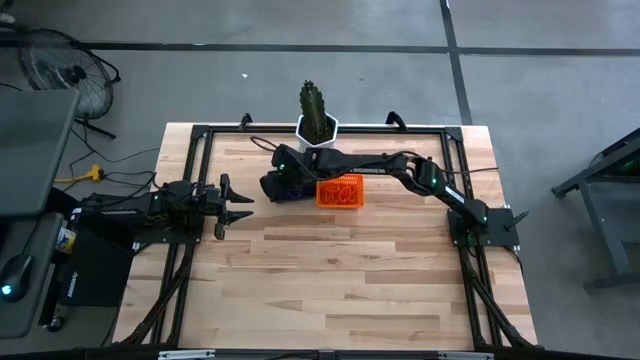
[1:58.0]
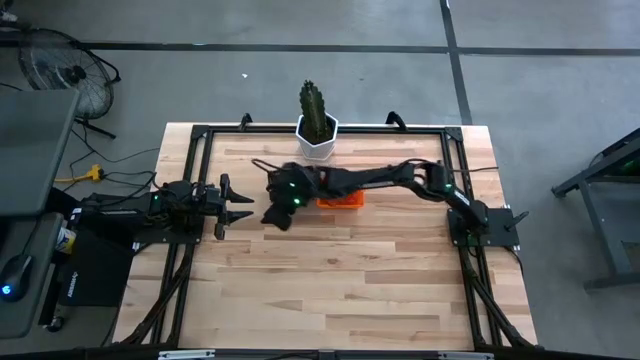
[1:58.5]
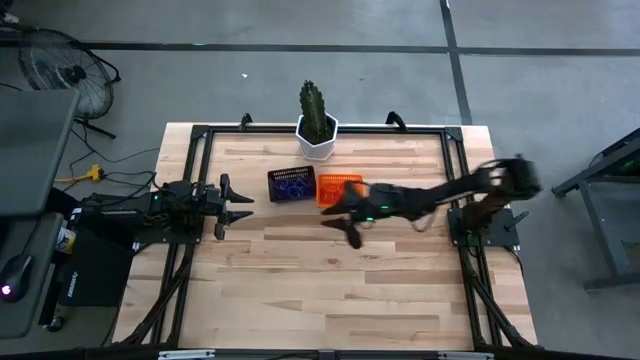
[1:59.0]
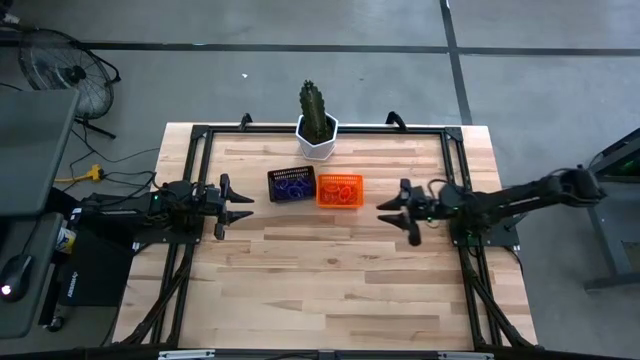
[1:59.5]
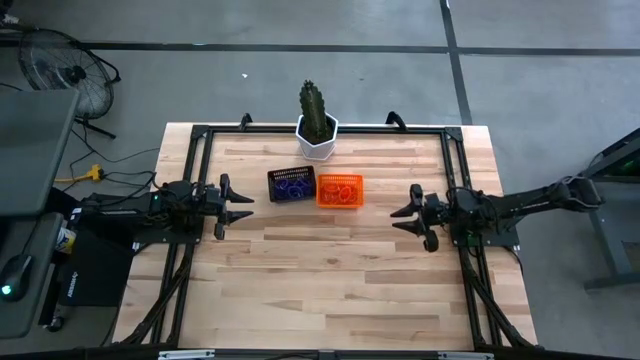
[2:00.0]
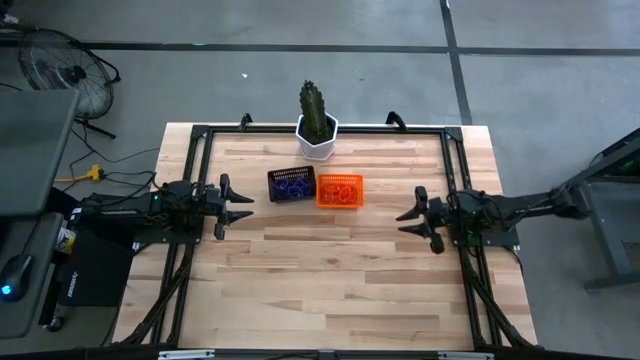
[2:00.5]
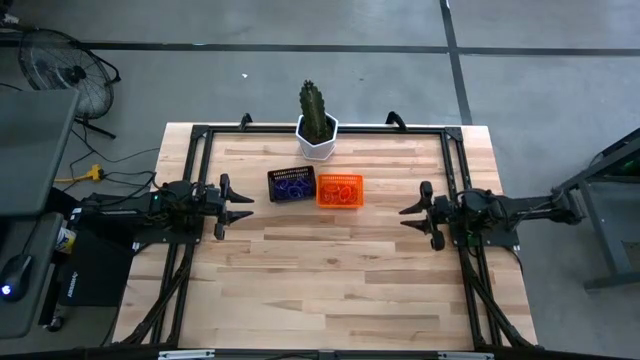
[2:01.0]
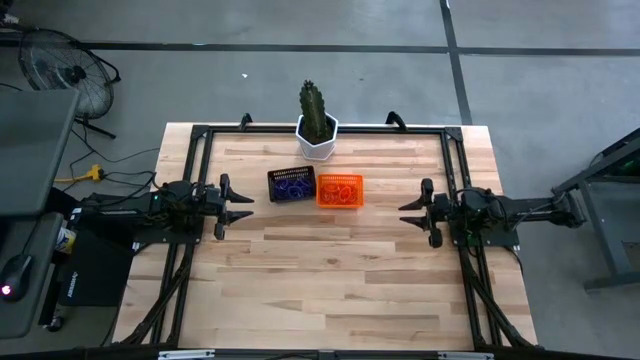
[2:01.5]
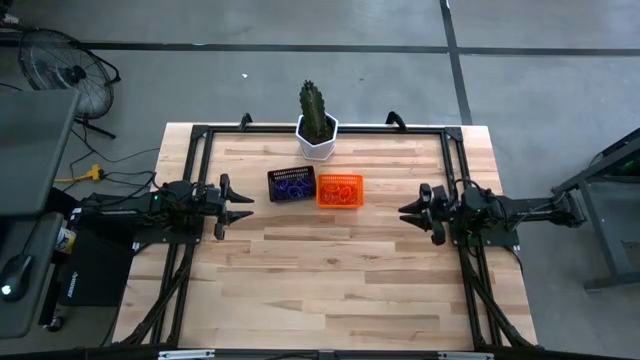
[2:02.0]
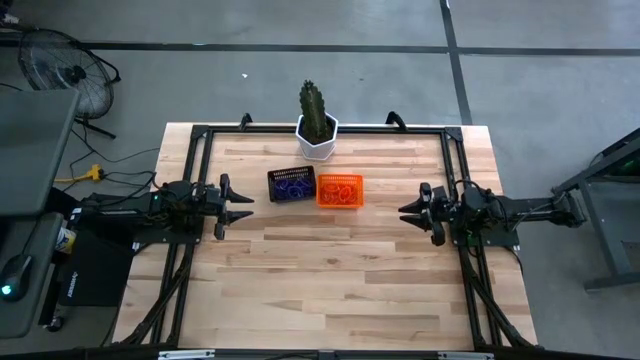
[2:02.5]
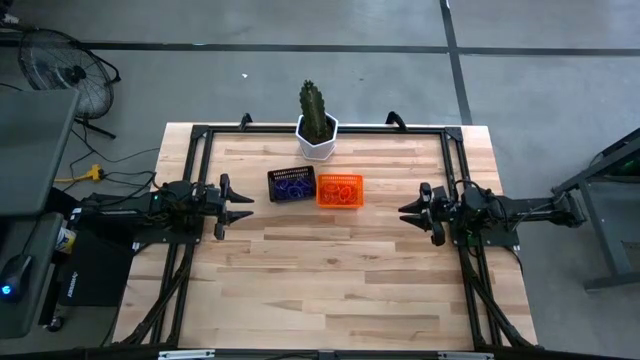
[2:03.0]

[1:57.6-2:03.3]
Task: Sort spring keychains
Return to home position

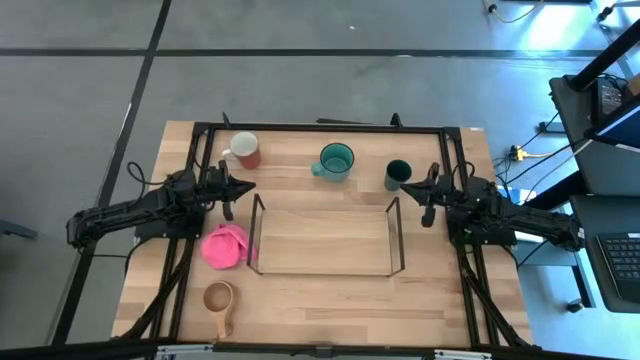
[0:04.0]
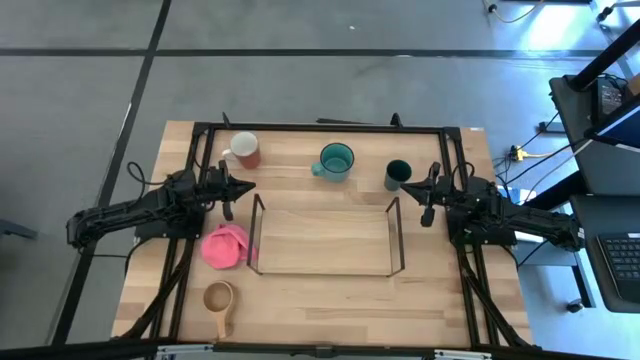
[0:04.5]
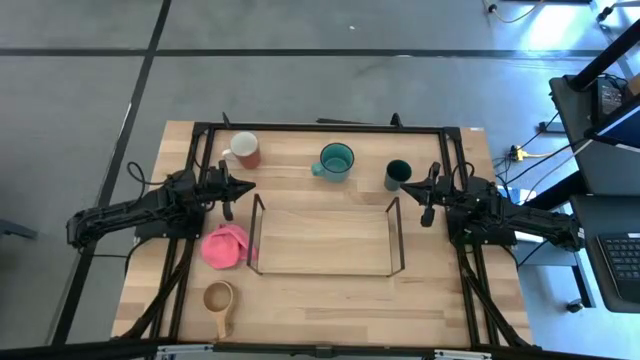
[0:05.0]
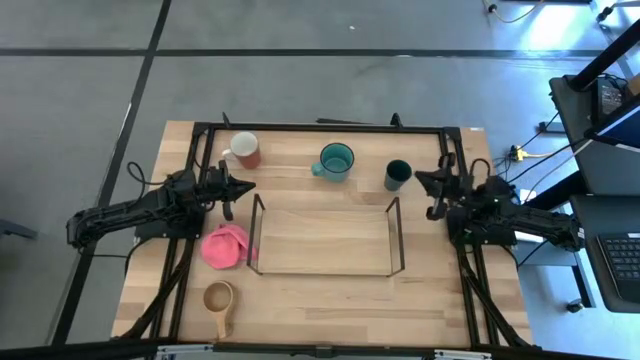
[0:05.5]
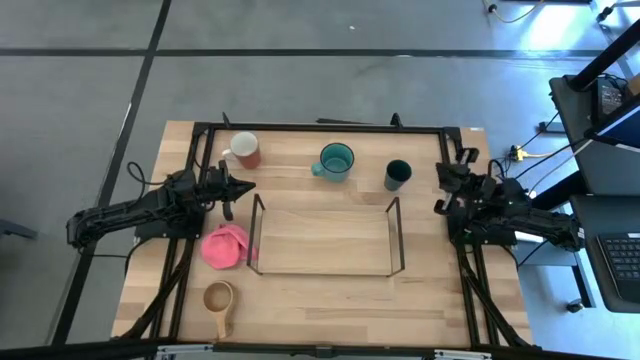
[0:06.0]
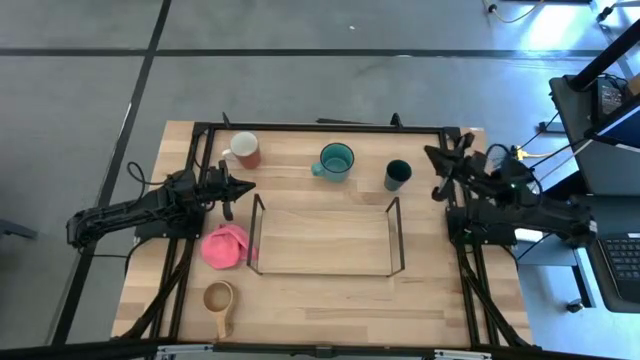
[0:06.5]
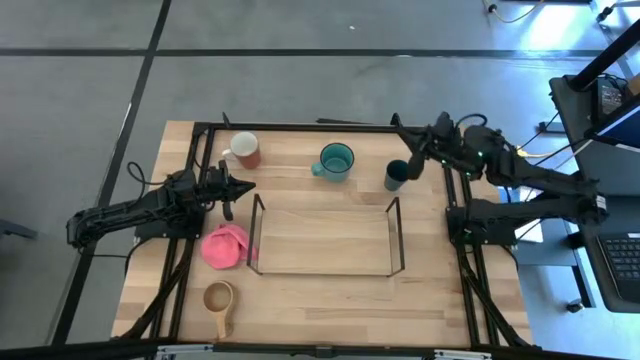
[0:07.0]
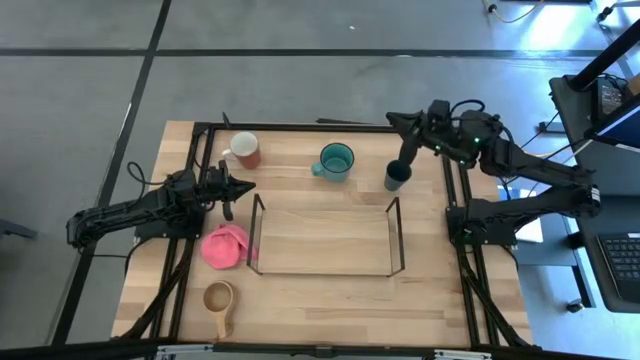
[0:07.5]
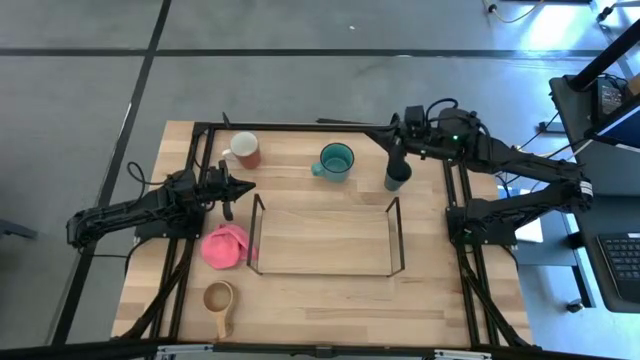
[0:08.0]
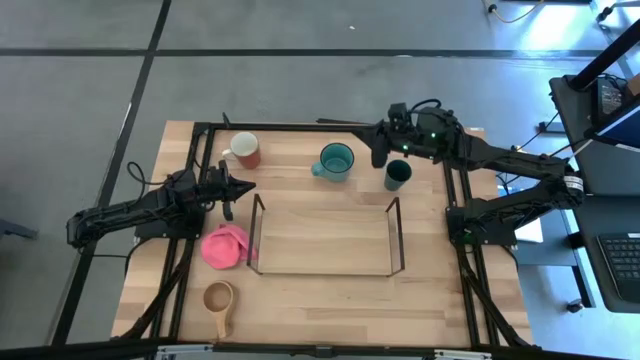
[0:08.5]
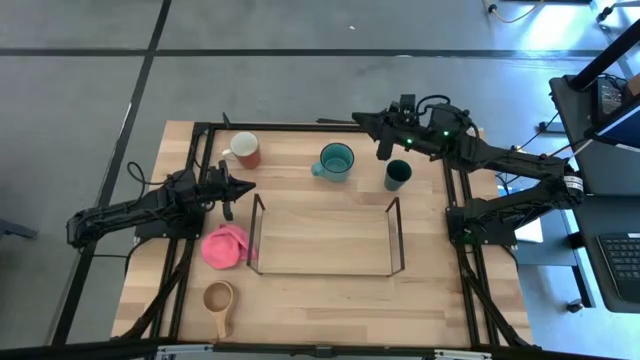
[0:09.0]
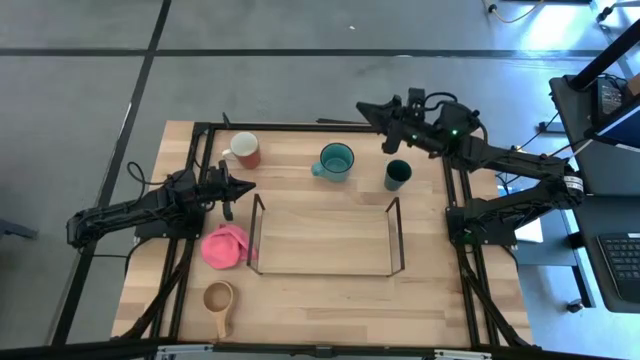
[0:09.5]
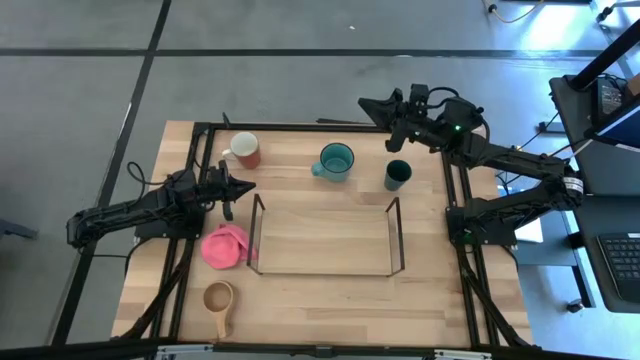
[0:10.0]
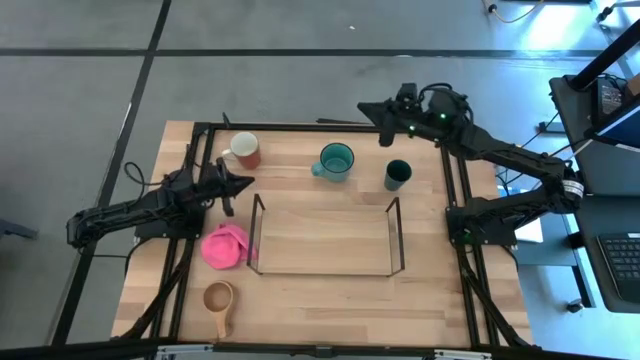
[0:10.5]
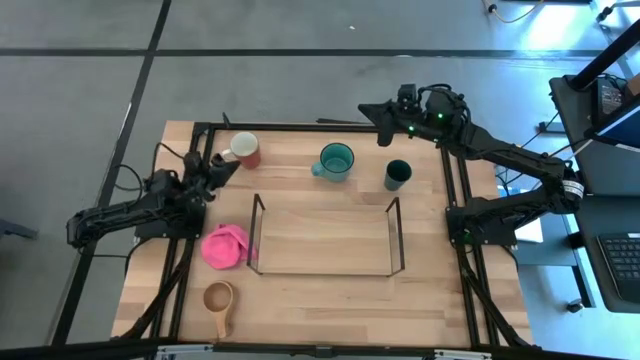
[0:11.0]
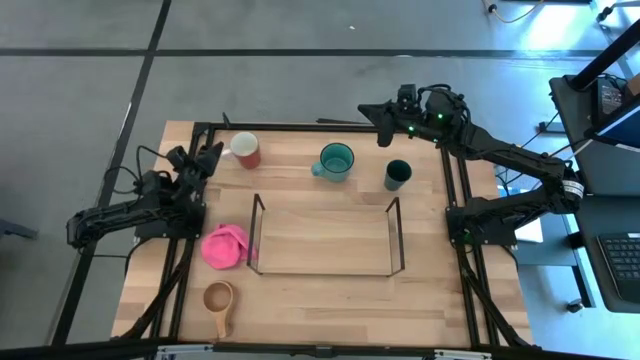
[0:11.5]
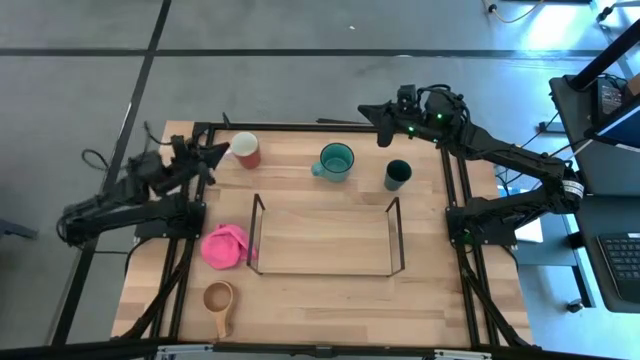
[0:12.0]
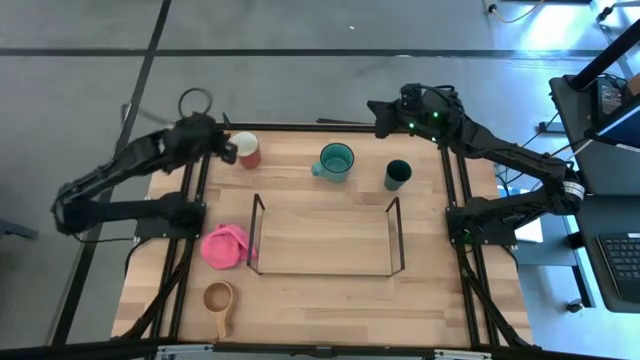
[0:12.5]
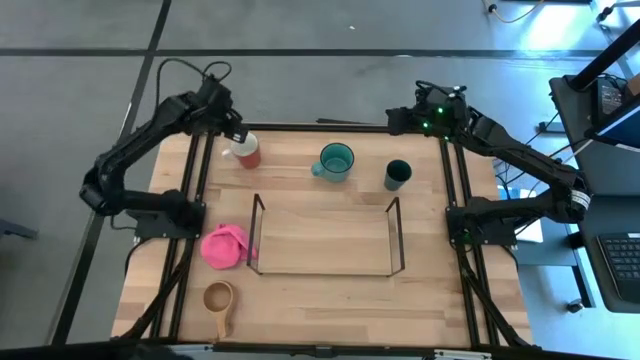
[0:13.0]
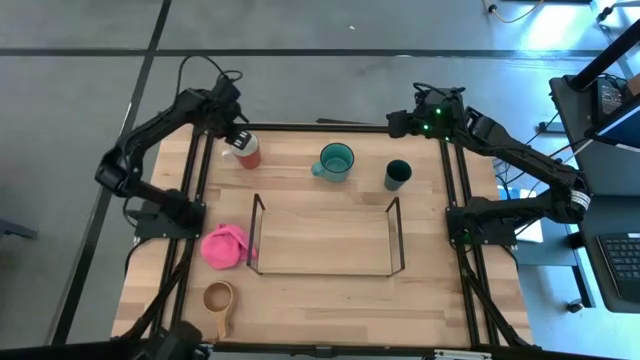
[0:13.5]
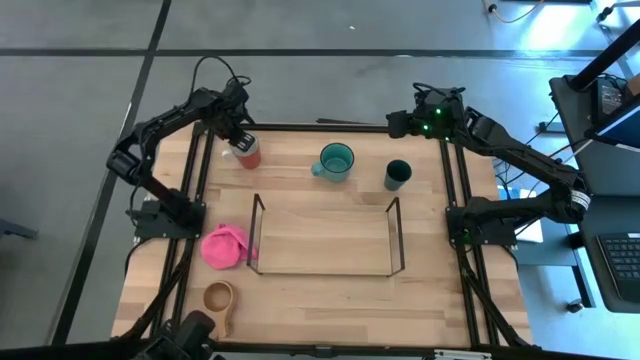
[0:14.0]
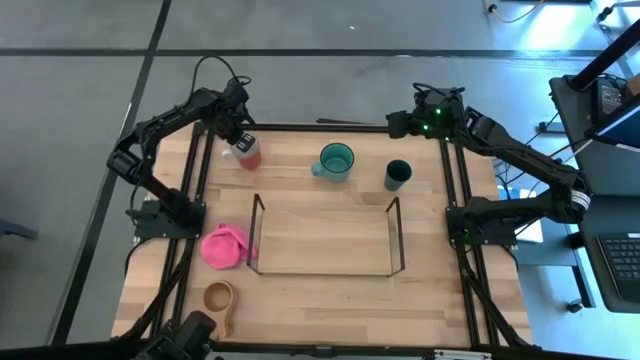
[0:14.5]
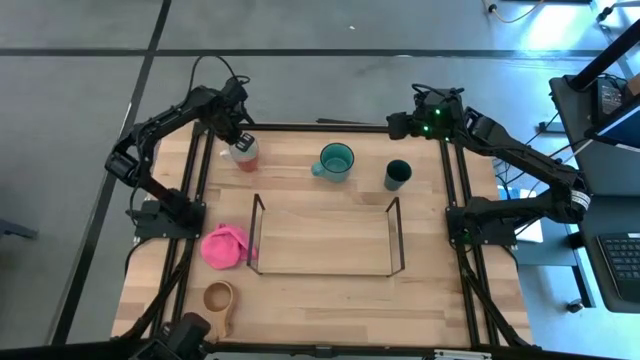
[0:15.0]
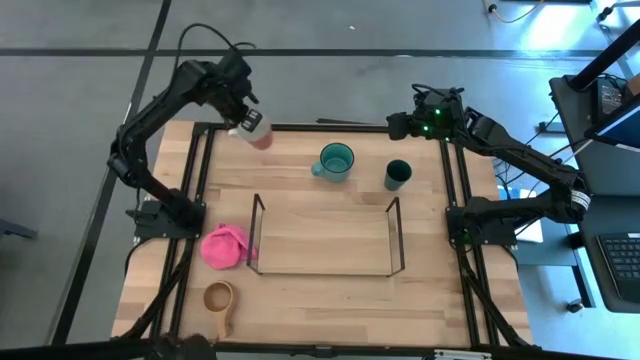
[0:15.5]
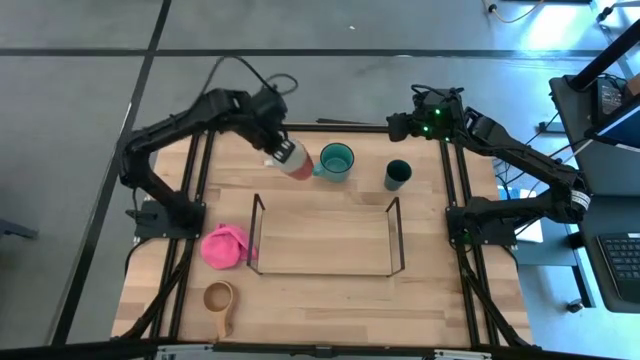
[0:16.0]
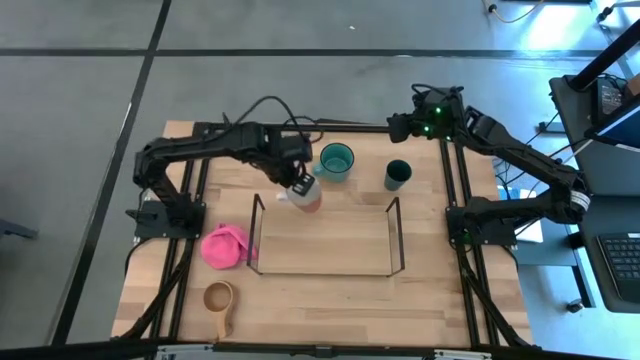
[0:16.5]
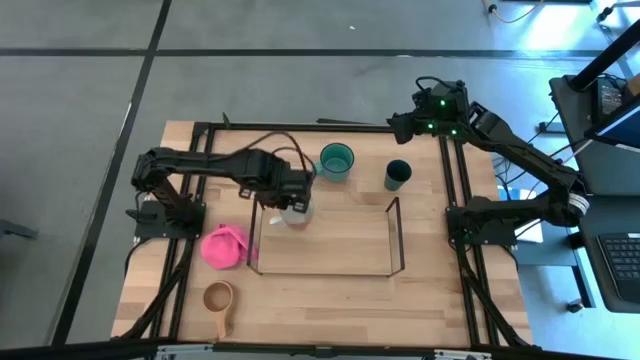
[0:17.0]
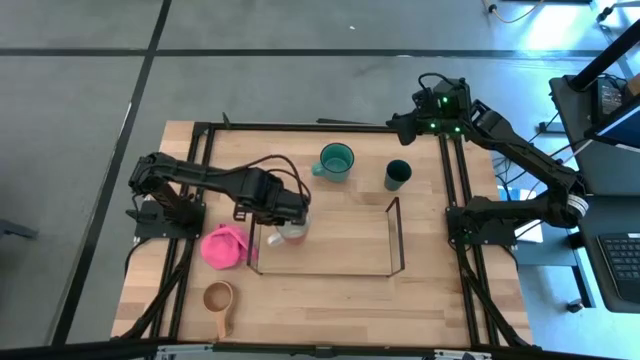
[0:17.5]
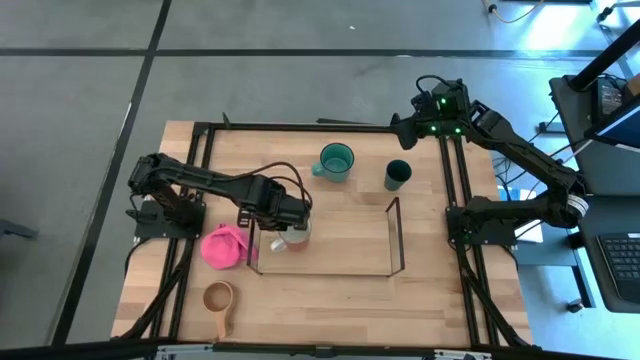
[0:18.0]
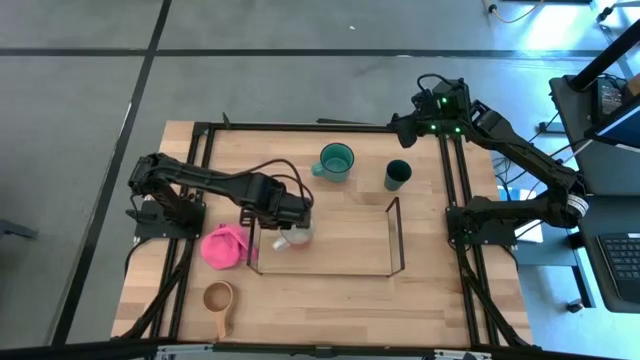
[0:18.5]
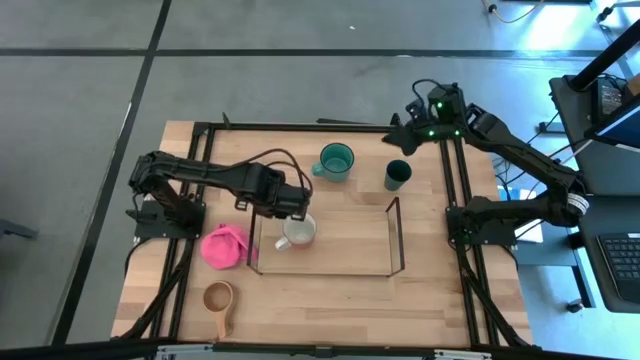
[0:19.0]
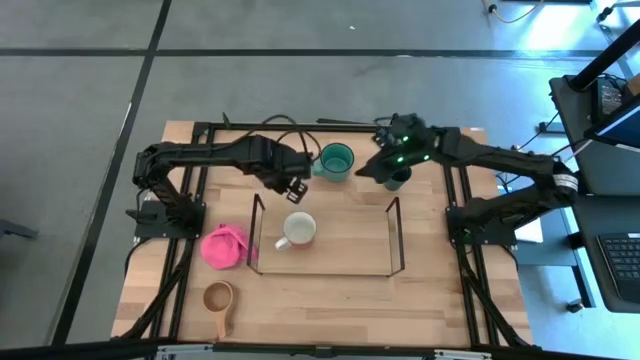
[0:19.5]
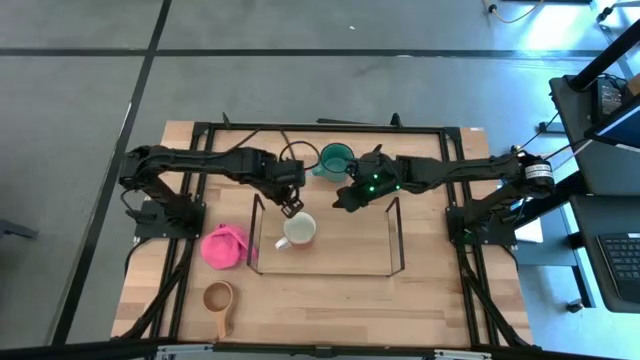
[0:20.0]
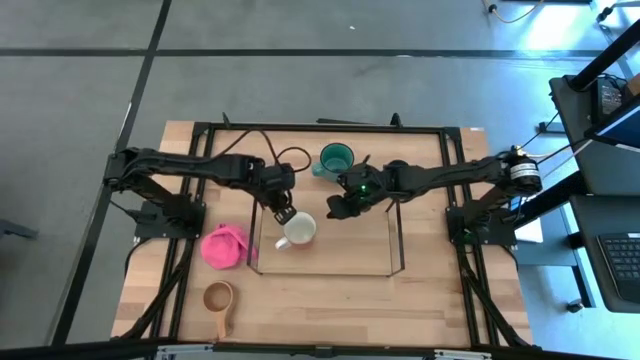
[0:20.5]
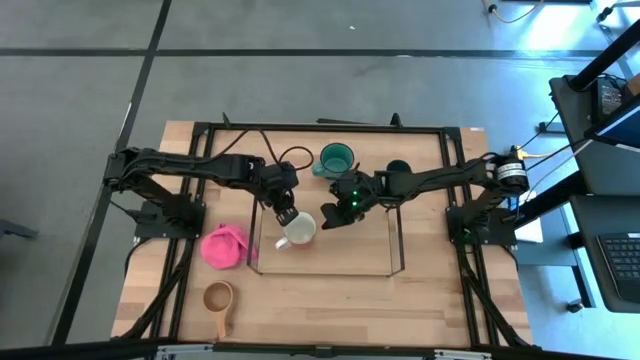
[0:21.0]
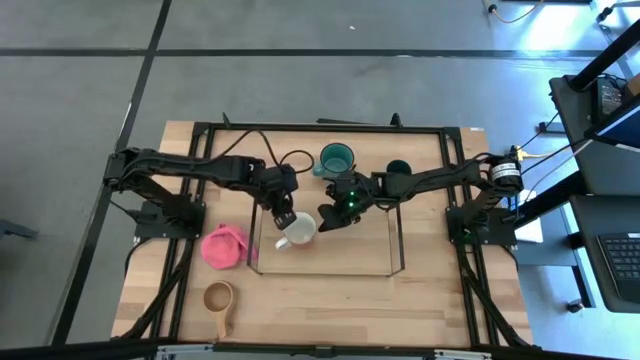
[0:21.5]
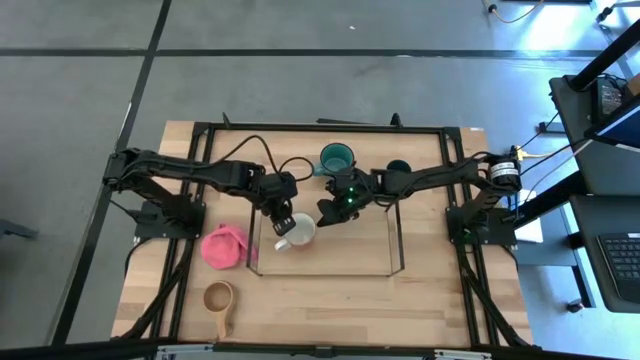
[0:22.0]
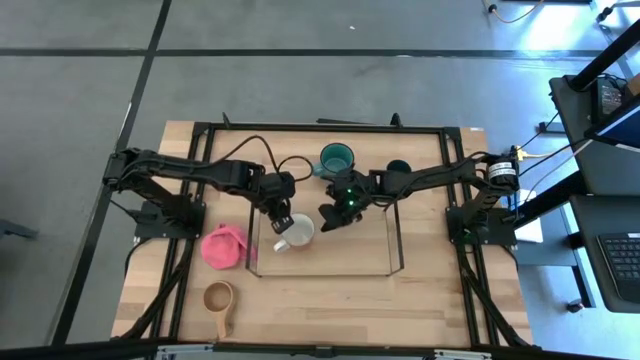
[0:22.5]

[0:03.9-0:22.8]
Task: Stack small to large cups/mugs on shelf
Put the orange mug on the shelf
